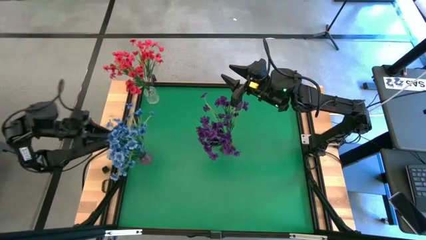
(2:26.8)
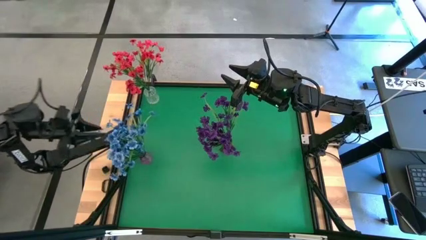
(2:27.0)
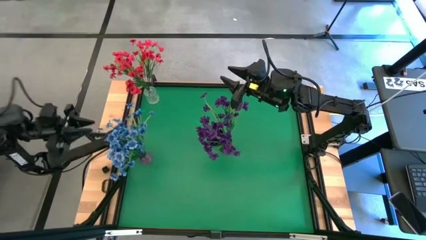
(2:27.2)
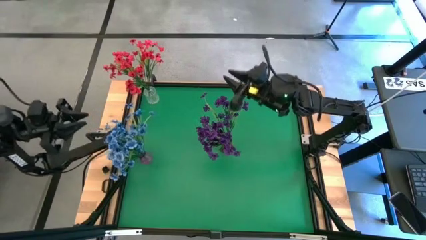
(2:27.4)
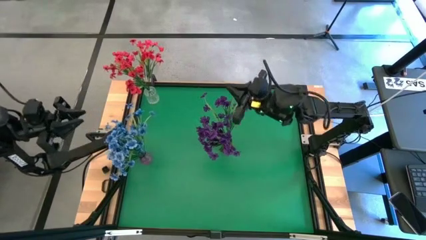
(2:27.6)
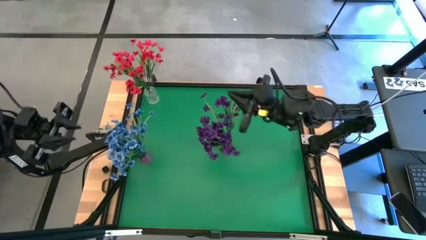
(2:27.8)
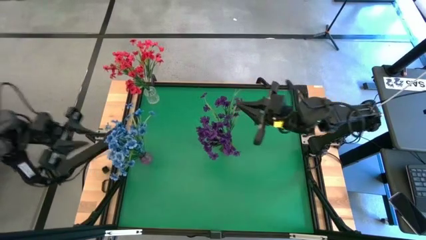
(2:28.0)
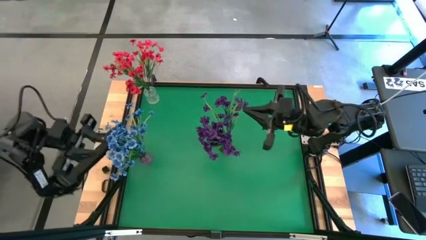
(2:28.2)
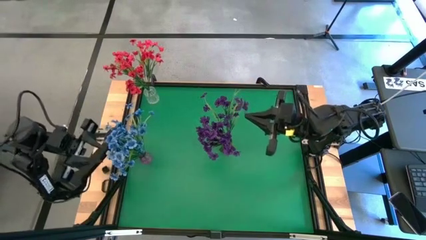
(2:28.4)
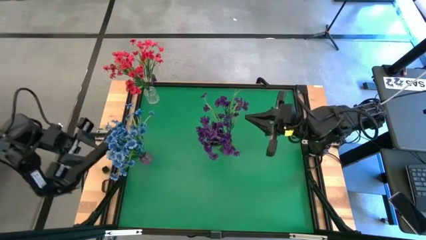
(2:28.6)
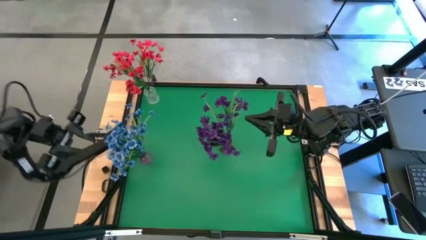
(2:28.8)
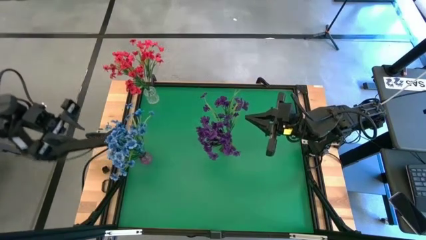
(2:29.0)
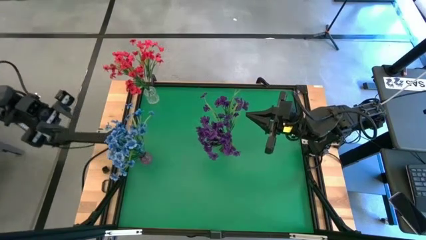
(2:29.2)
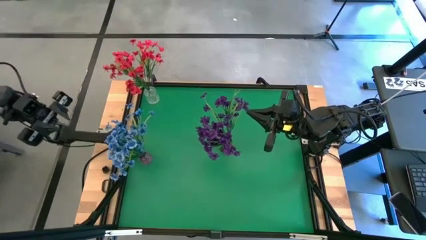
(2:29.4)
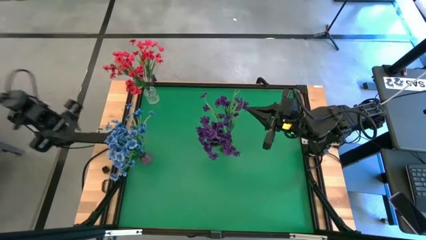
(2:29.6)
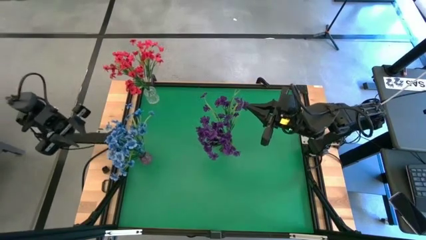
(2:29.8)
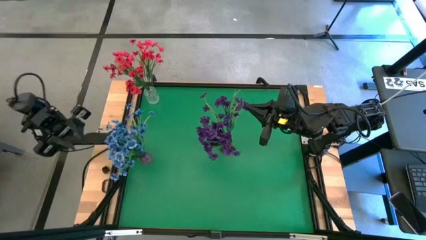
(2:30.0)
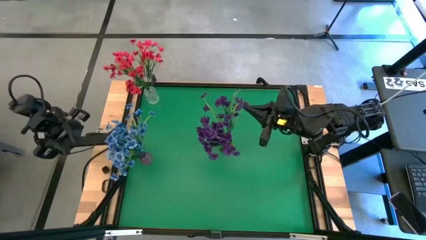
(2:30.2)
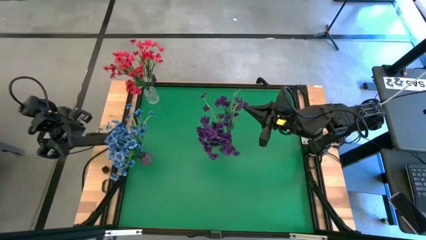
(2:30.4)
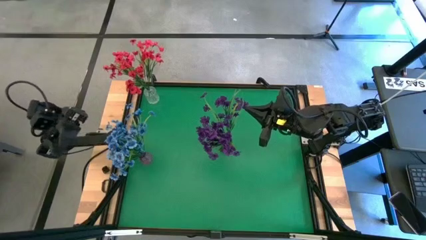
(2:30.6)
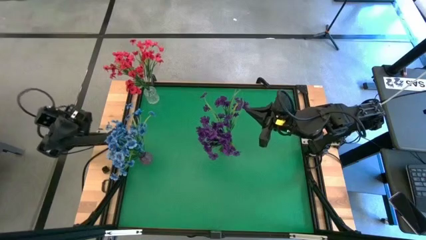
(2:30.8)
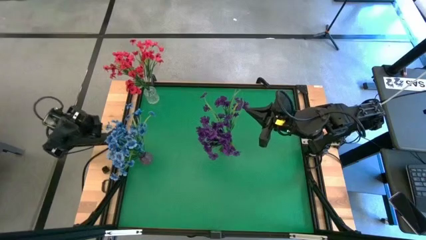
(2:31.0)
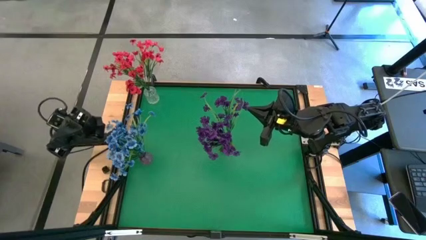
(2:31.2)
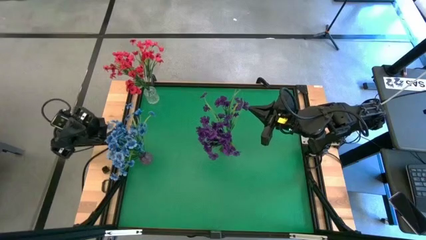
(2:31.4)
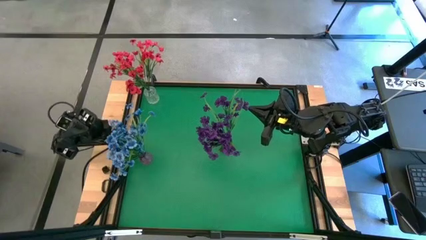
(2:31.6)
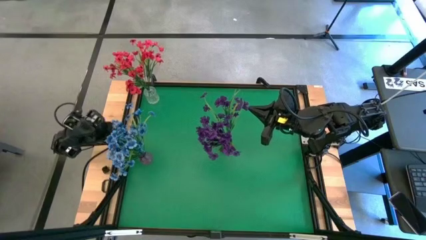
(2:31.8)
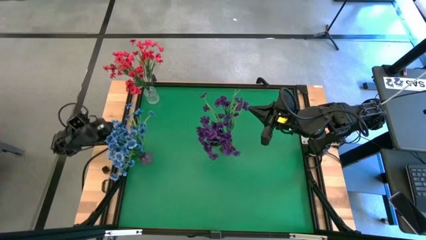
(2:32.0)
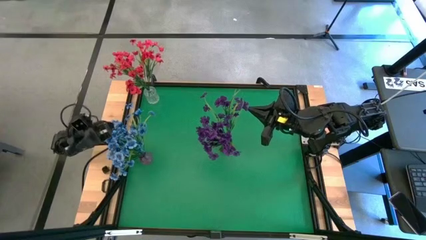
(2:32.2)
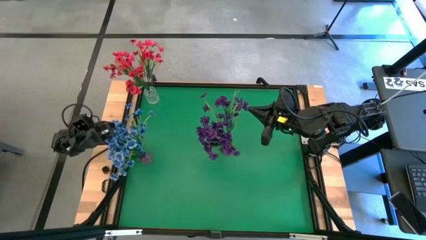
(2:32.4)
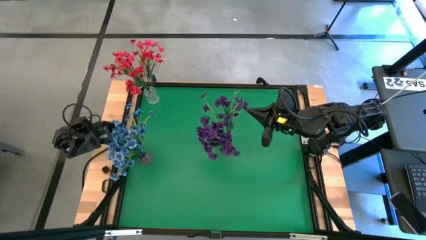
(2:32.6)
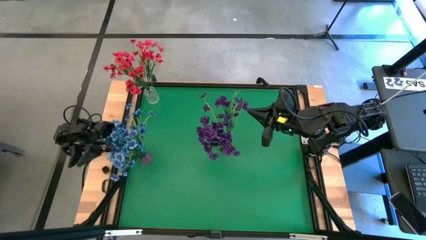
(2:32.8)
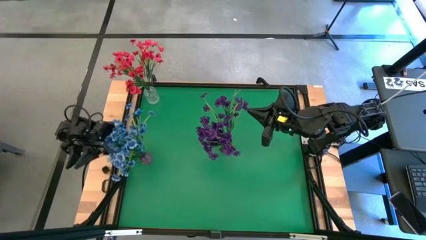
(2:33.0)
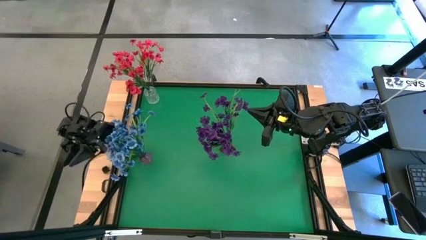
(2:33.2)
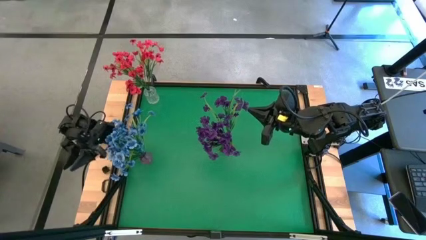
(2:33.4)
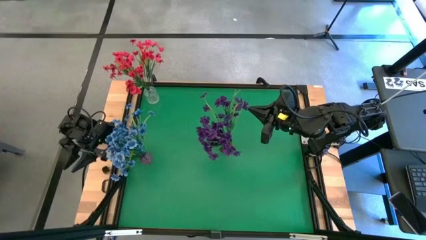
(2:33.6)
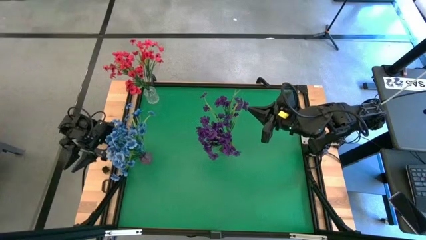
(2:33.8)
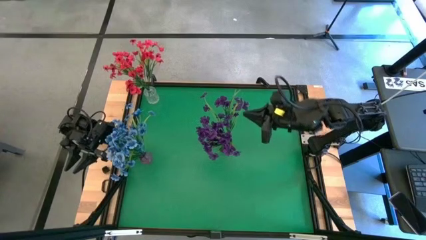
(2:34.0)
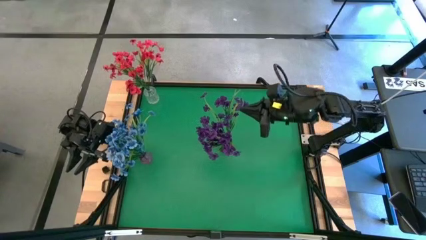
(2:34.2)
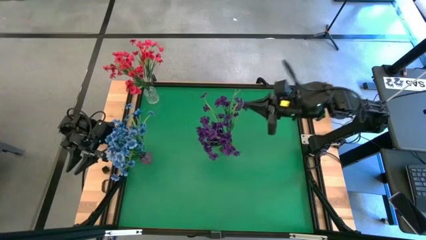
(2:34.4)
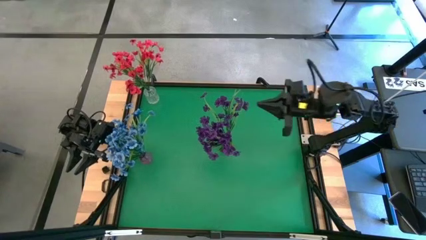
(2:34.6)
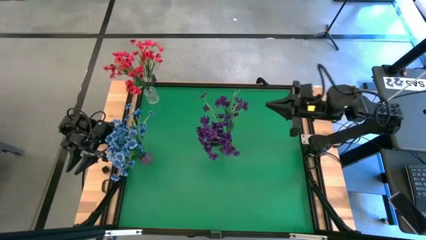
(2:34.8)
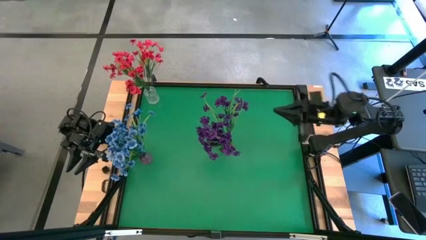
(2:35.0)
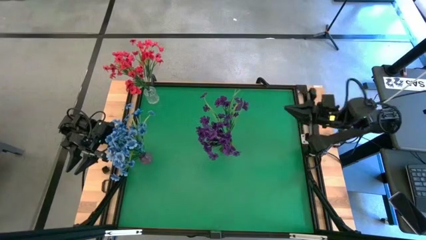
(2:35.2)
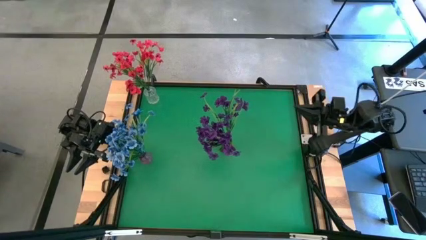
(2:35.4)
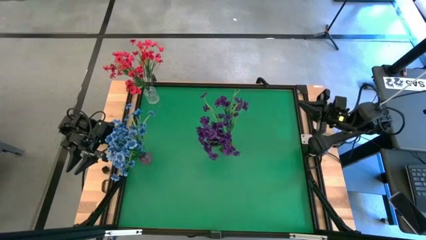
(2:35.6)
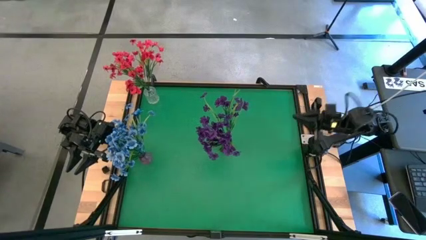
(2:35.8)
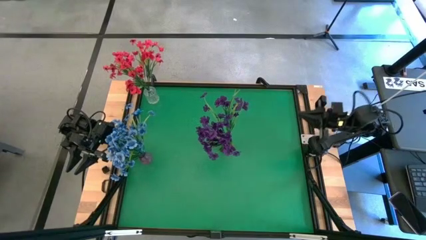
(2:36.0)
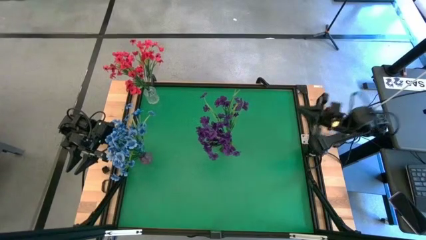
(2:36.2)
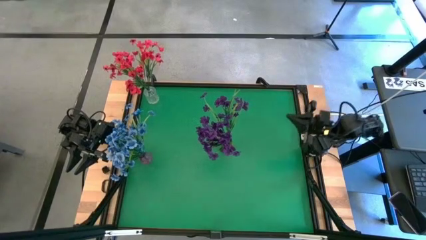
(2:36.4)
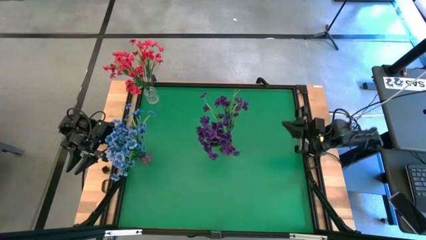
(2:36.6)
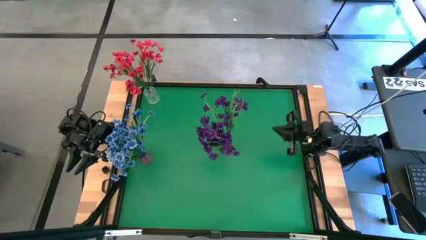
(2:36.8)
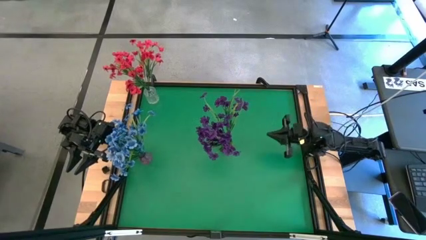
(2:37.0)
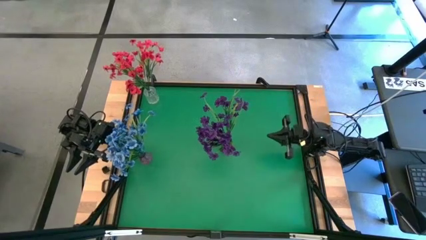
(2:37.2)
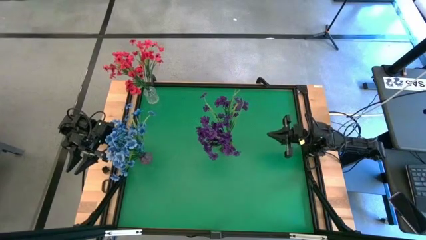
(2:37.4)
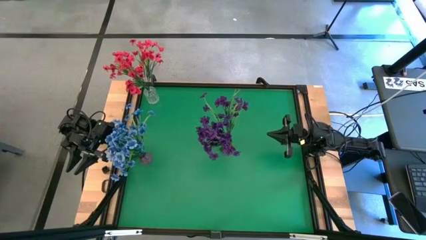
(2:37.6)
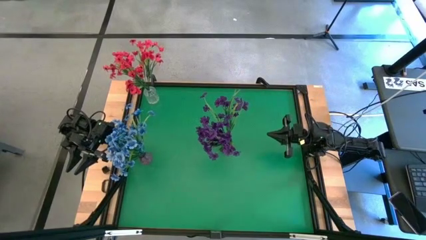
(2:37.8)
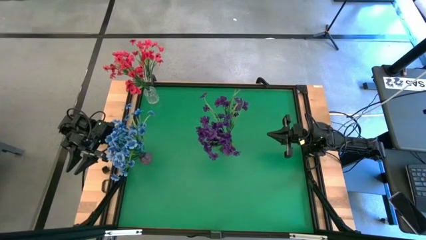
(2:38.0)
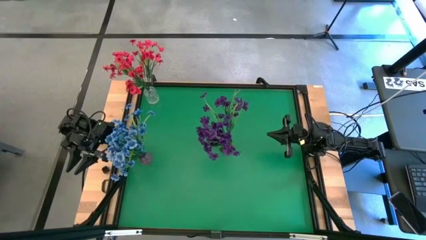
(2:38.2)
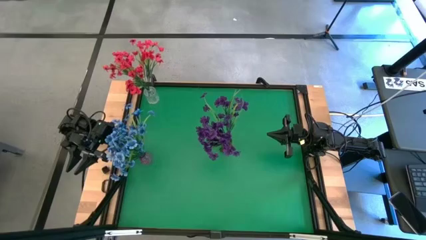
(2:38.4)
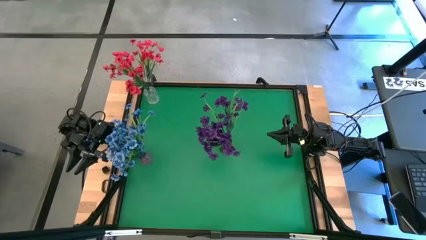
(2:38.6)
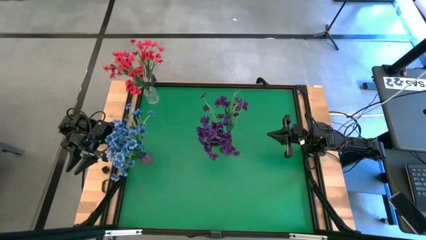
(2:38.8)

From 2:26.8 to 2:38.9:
Task: Sort flowers into vase by color
Return to Home Position

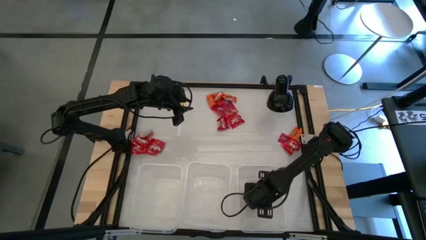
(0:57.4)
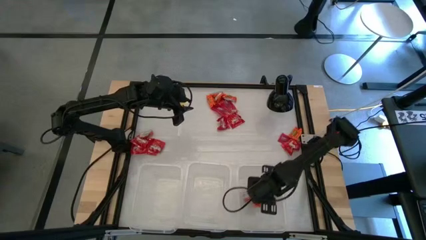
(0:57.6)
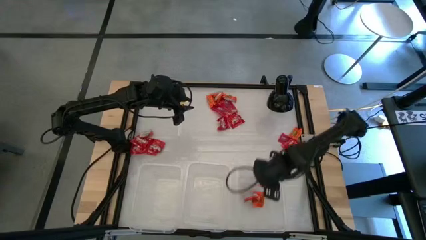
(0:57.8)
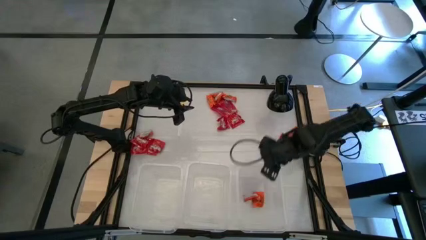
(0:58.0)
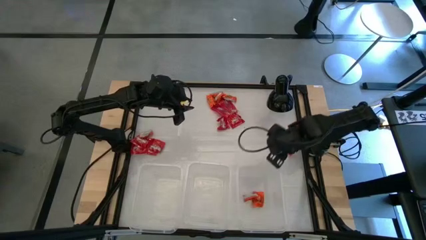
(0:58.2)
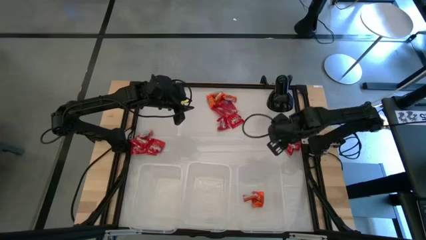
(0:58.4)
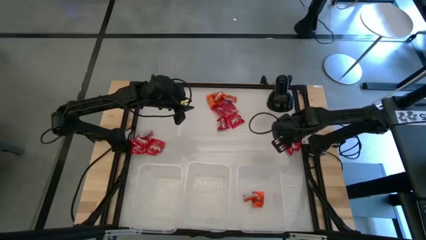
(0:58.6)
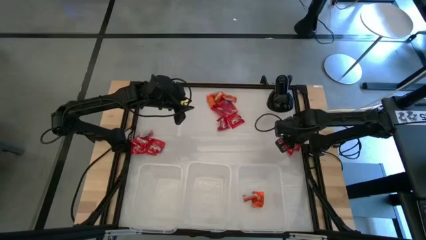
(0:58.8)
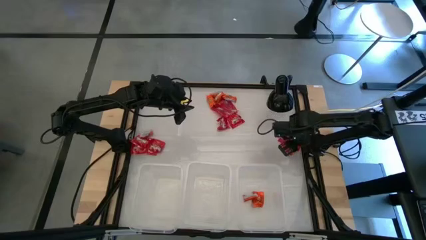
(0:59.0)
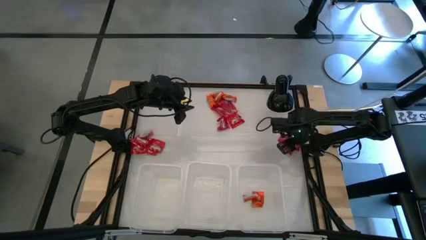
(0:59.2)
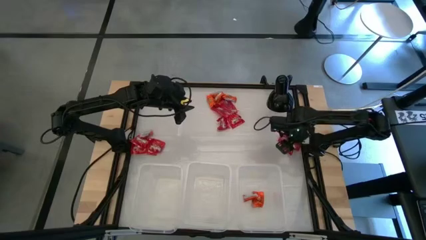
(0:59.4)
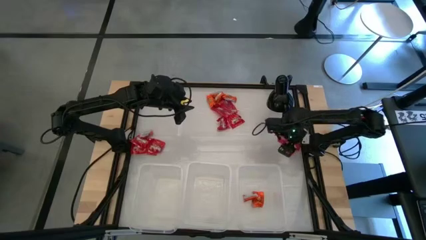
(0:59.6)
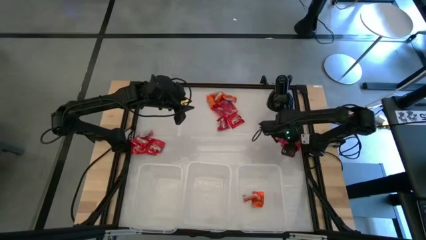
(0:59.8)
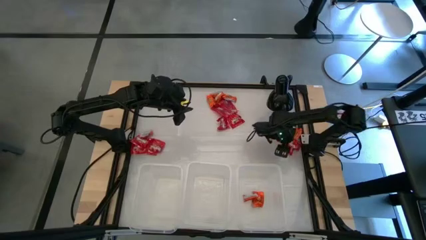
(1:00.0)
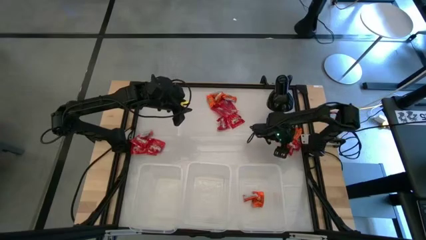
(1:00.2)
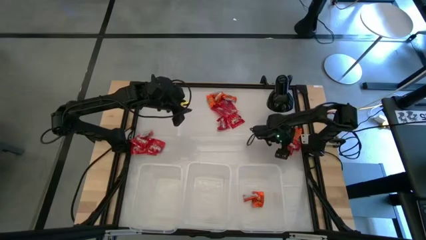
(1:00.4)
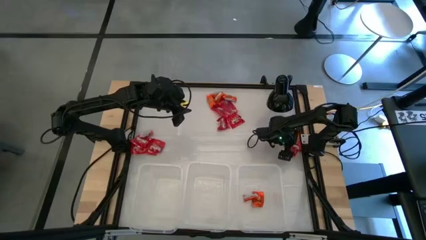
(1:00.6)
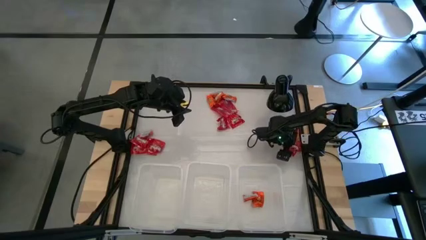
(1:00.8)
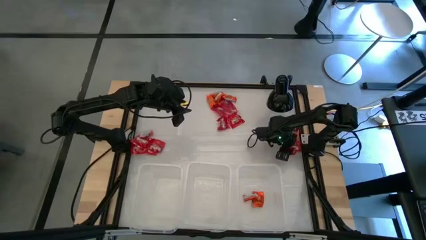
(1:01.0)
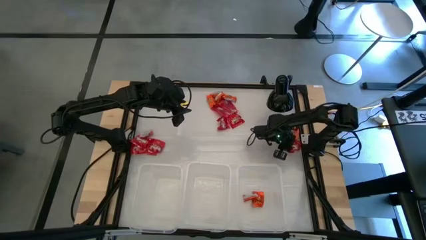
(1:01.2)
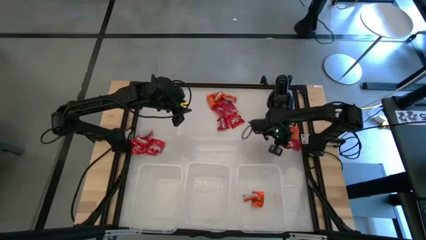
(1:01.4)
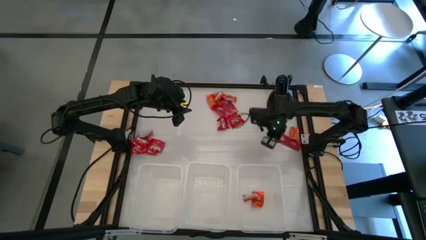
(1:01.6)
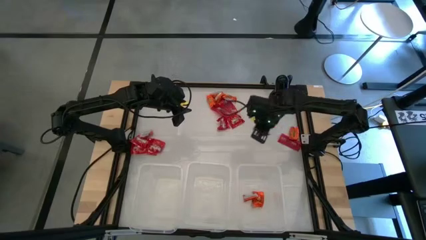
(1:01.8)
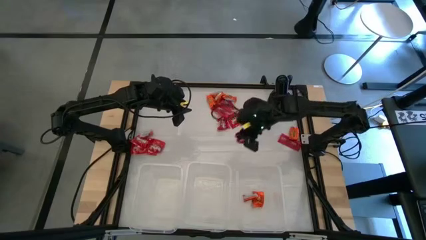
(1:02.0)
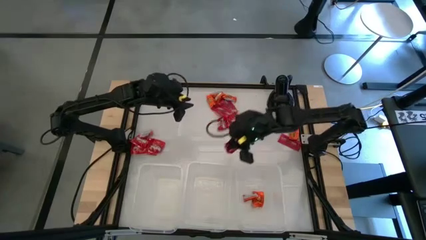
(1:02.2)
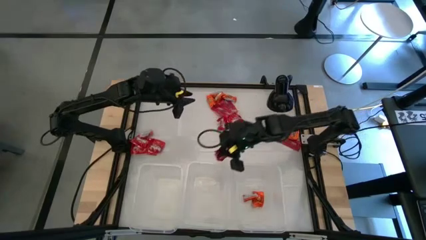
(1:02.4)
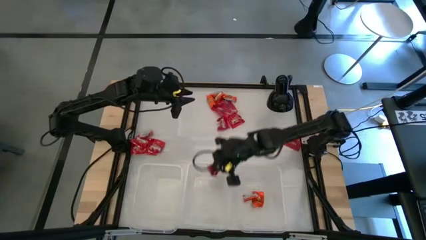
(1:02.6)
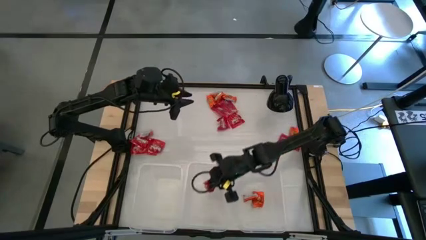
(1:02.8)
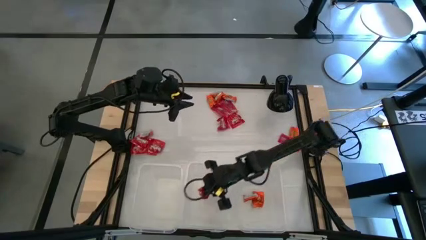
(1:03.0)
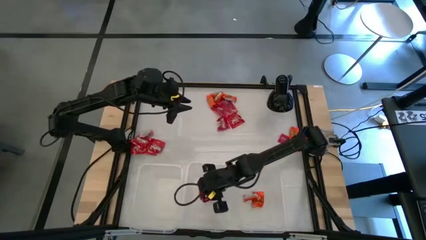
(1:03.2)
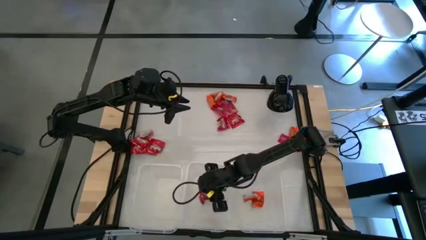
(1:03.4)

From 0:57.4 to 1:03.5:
Task: Sort candy
Put the red candy into the middle transparent bin
